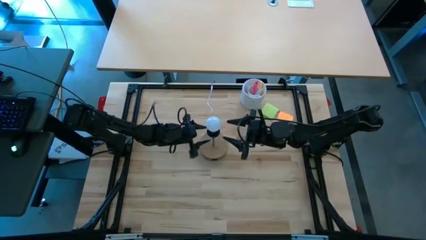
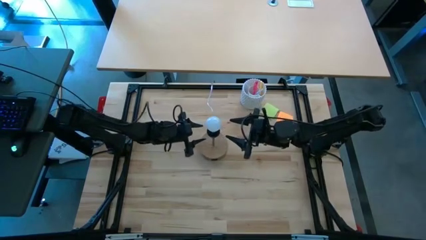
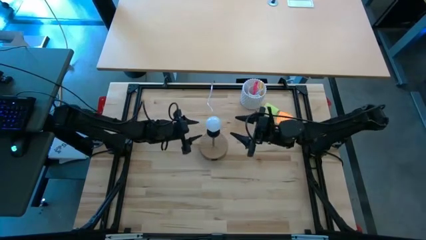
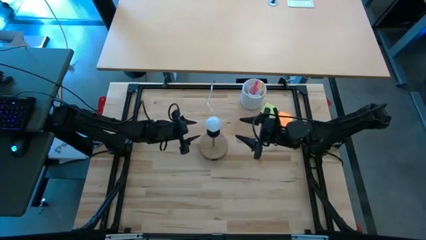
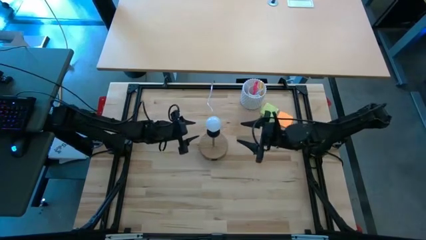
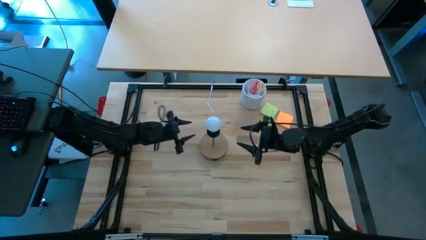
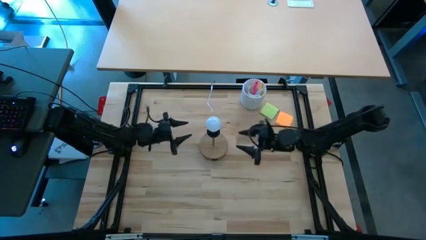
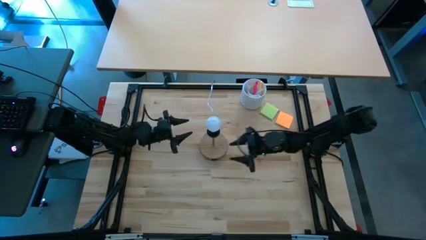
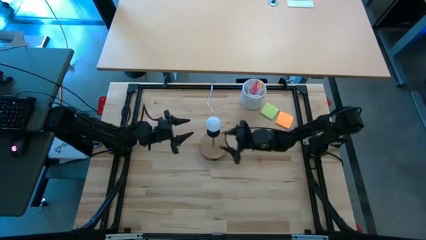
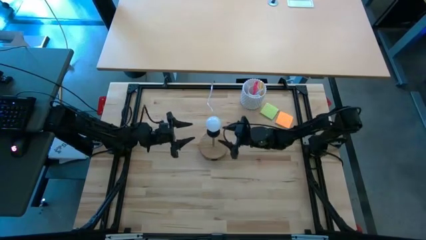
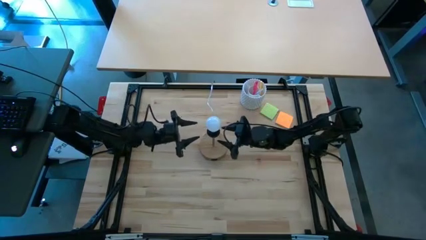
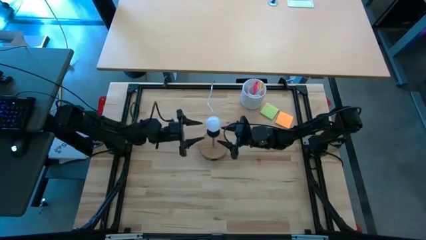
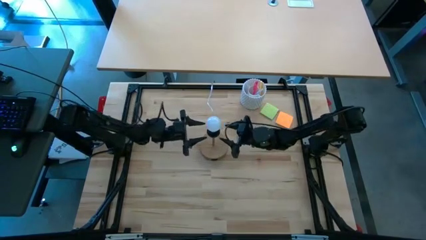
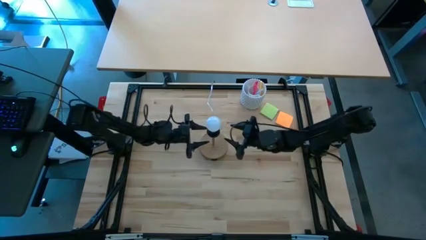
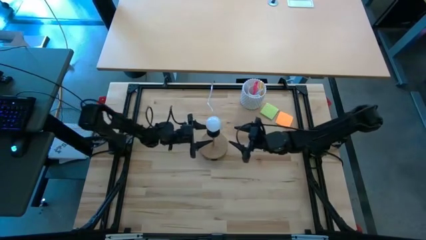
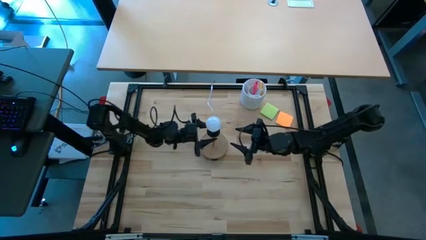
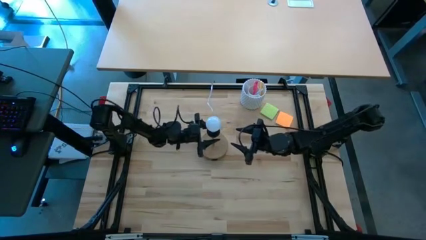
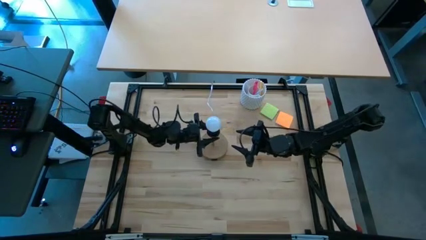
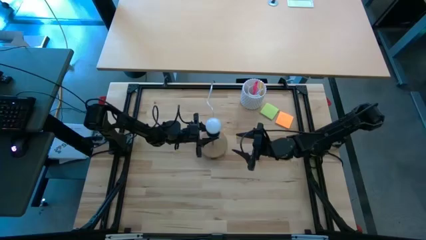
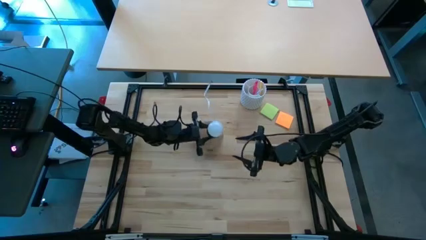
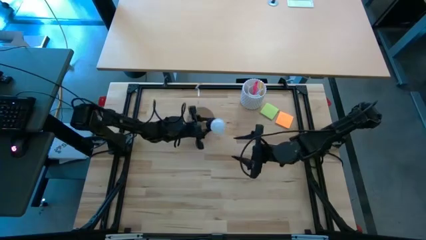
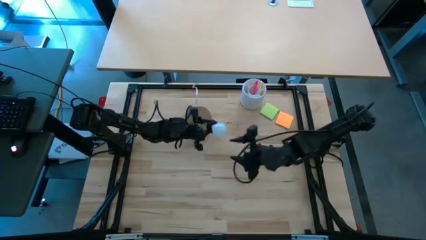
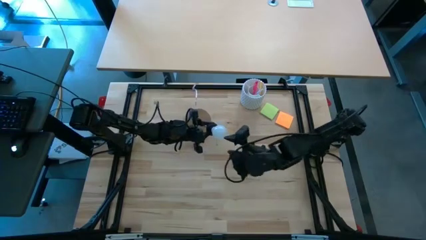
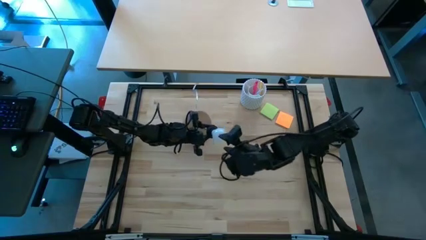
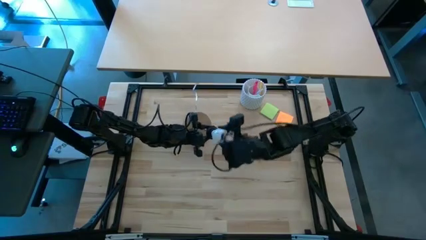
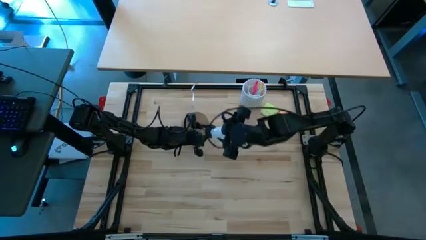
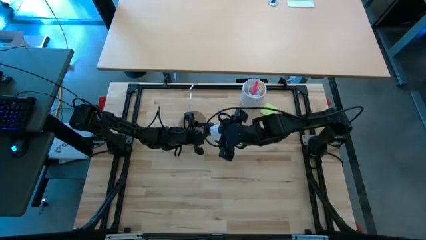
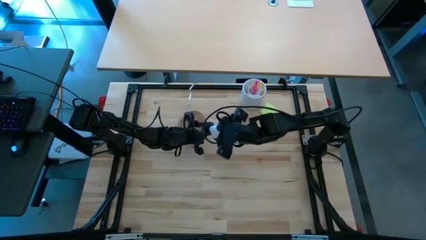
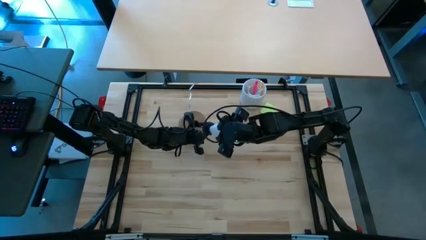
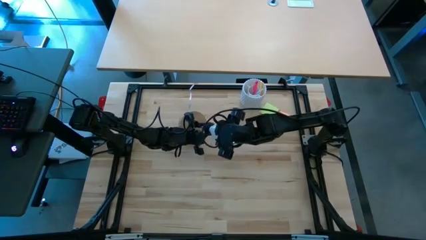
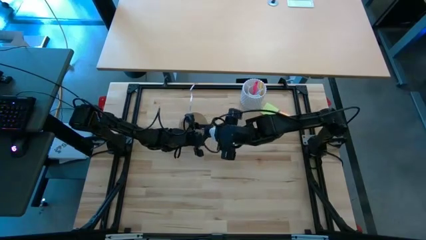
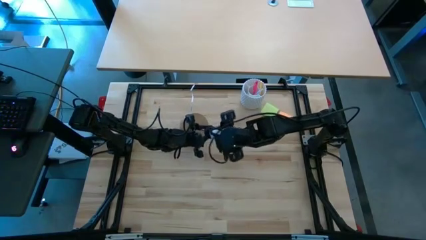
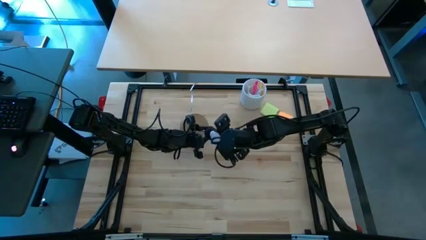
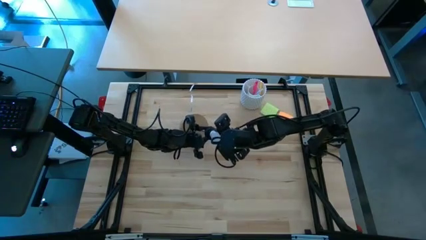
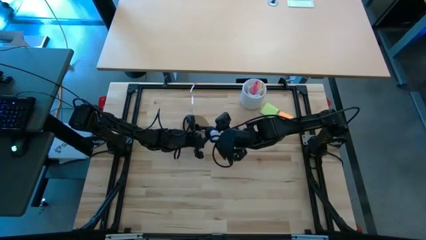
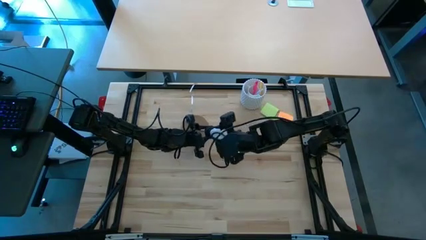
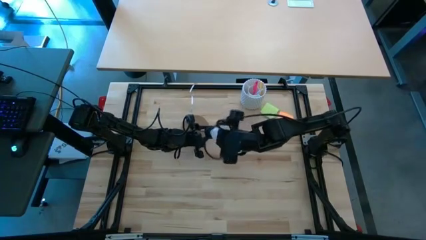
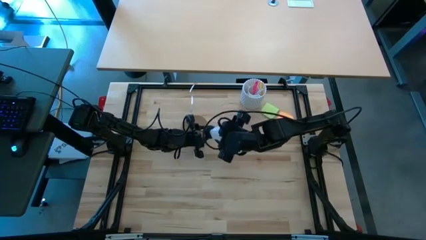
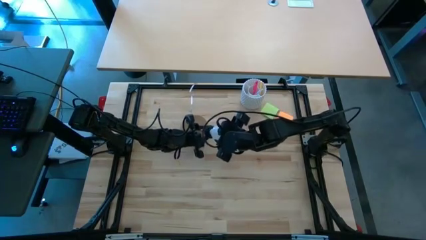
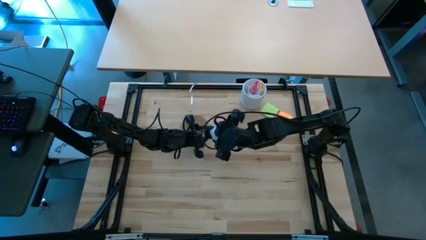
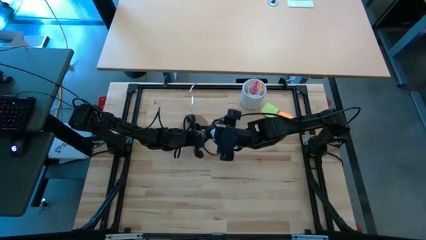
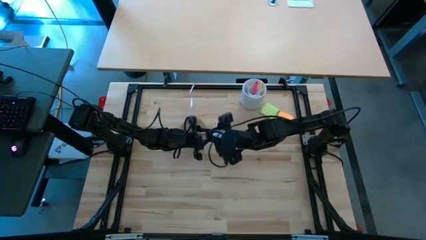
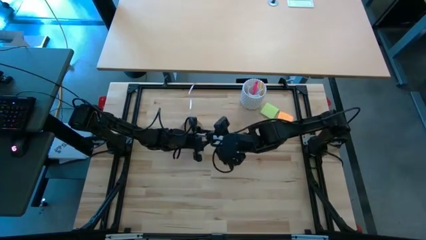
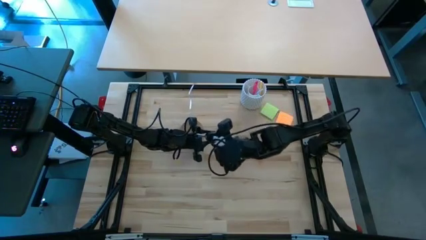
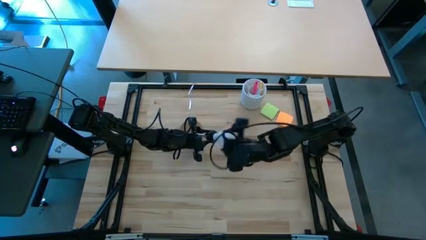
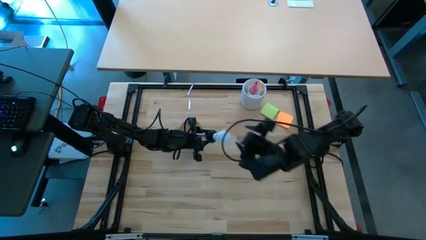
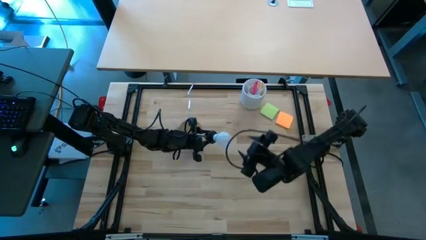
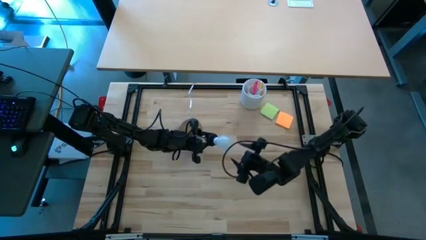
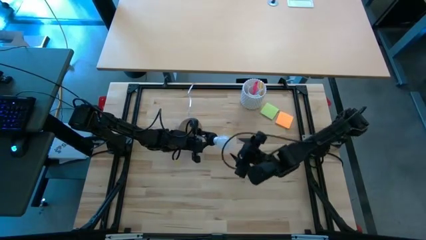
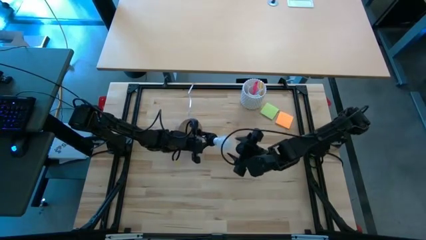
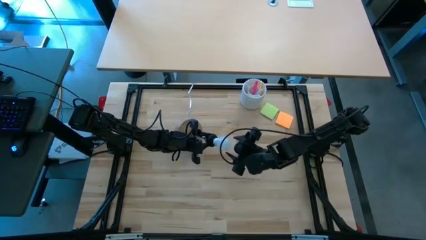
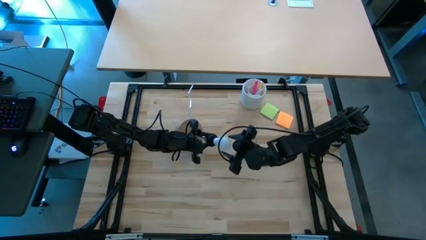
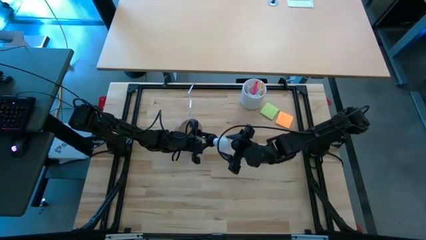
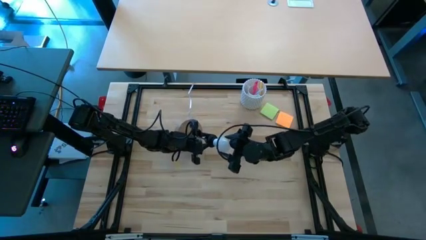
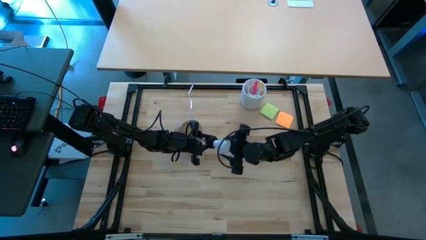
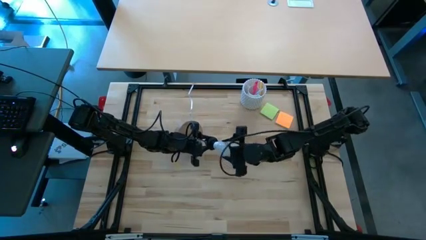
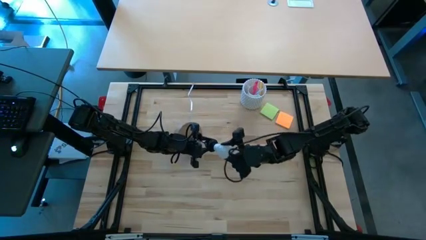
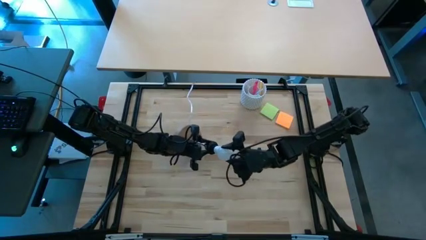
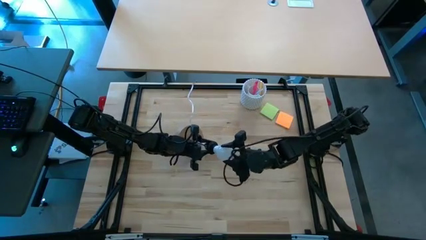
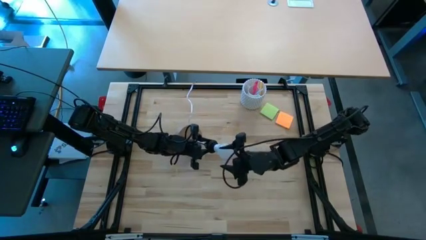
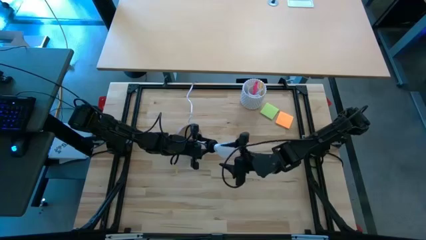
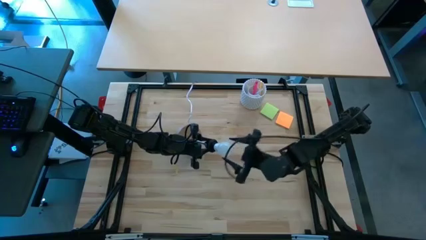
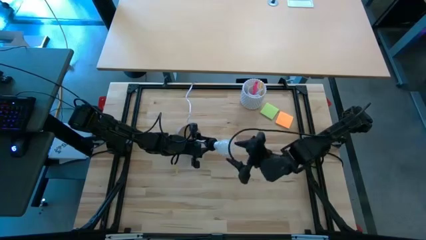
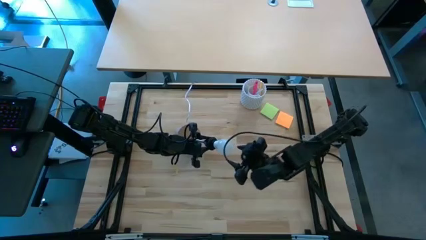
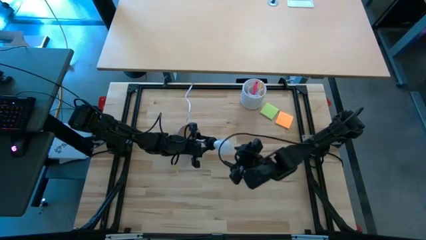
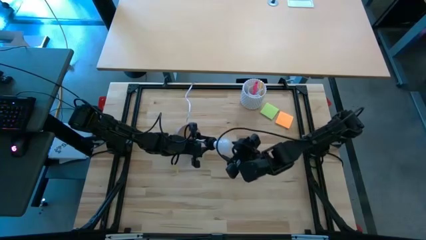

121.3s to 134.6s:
Task: Screw lightbulb
Remove the light bulb from the lamp

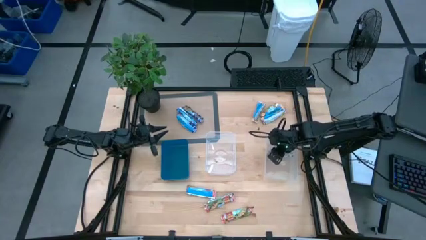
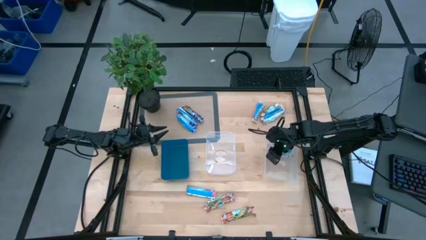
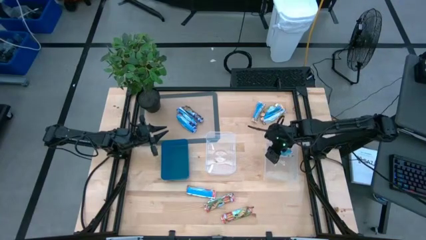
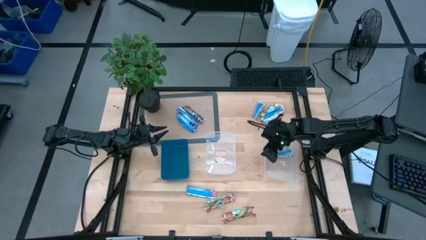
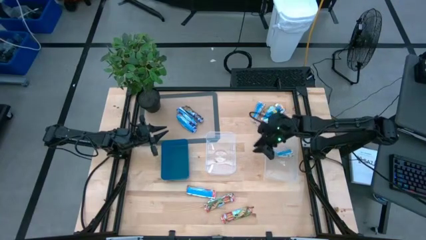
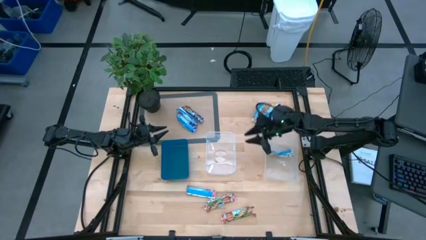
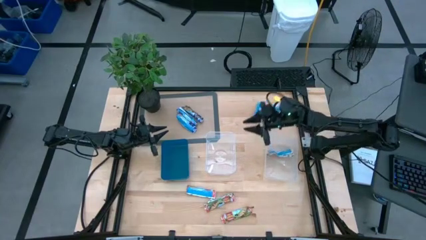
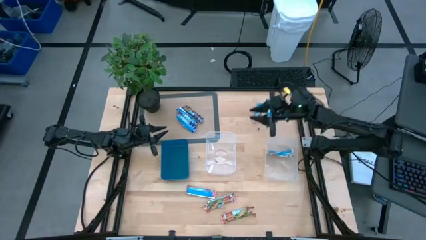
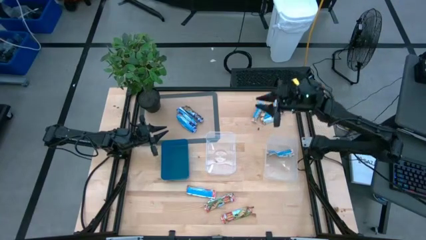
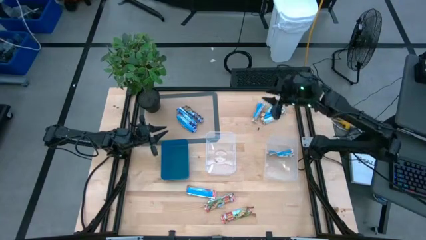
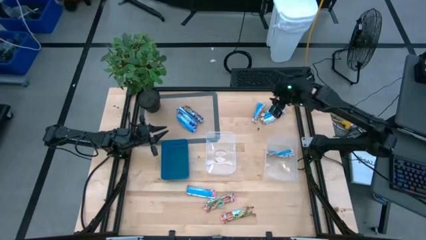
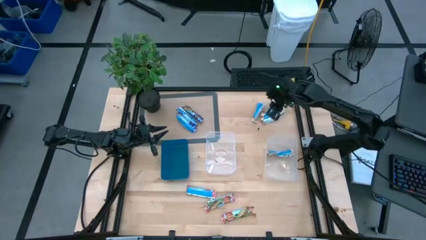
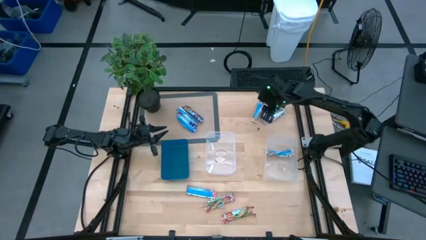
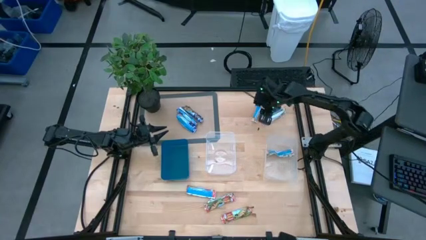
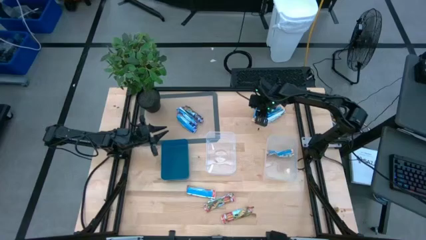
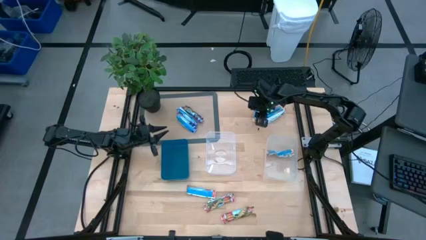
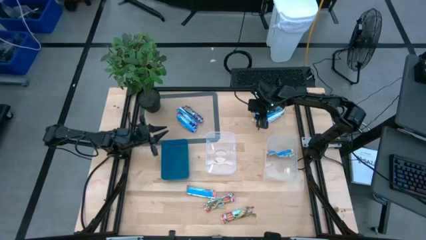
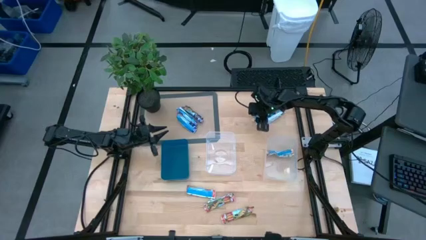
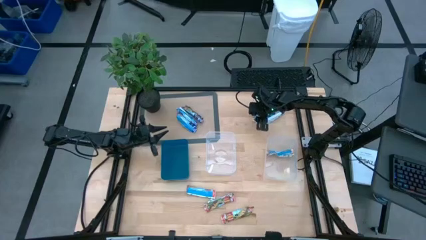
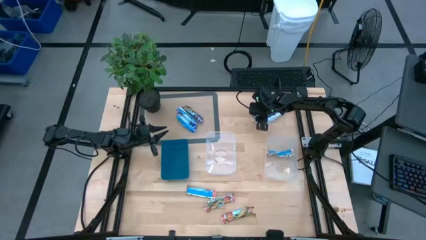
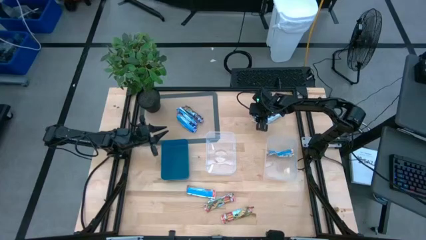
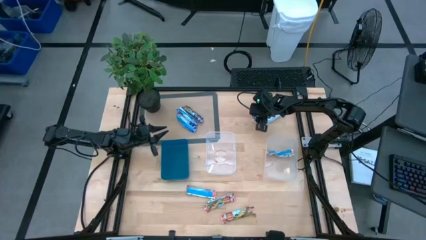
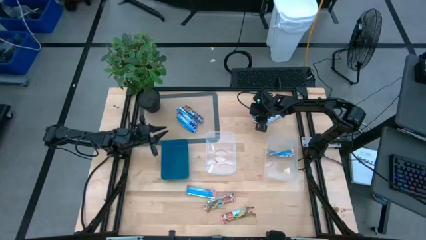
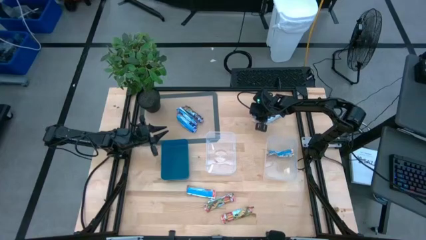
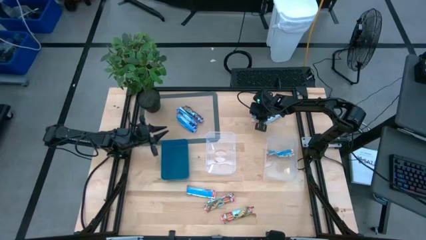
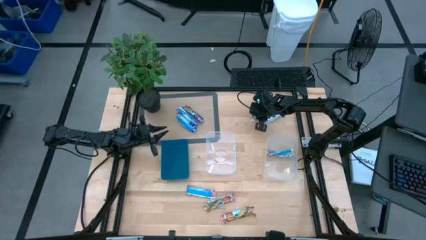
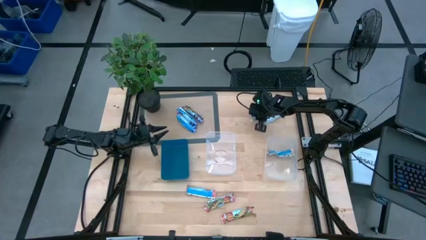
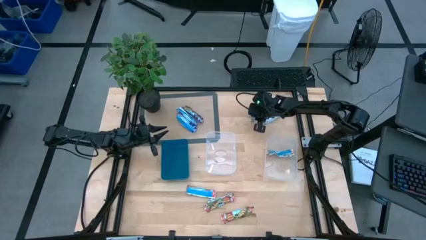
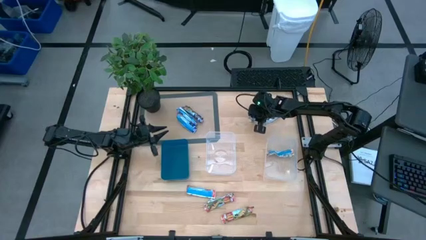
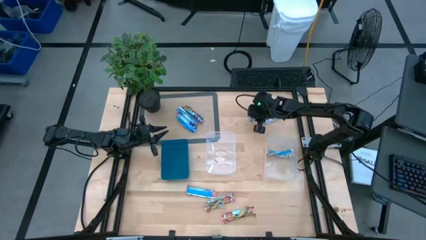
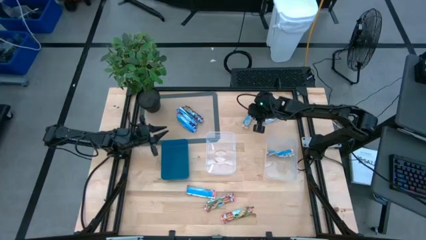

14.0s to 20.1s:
Task: Pick and place Granola Bars by type
Put the yellow granola bar into the right transparent bin
